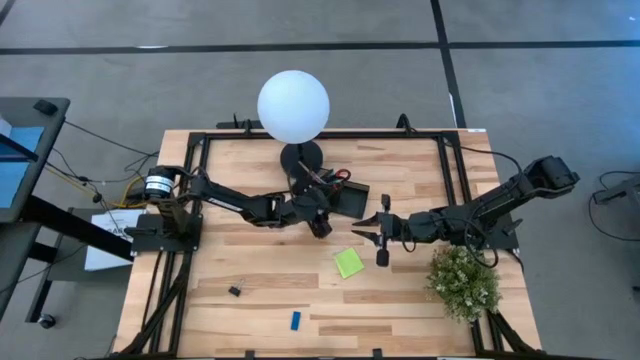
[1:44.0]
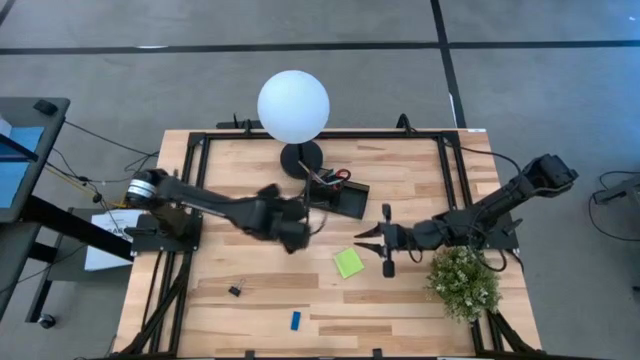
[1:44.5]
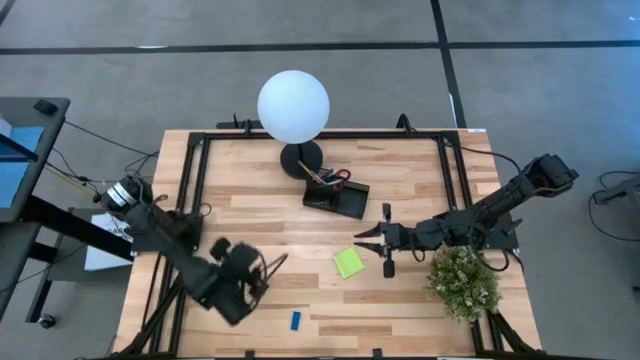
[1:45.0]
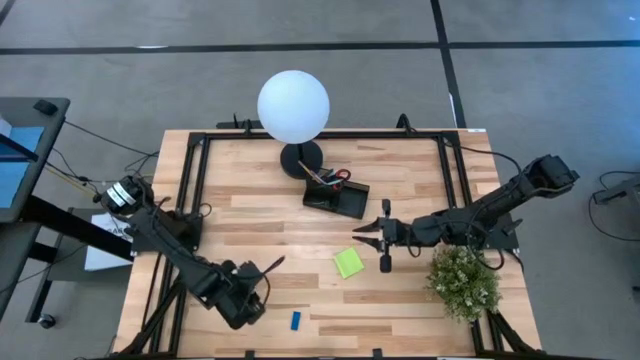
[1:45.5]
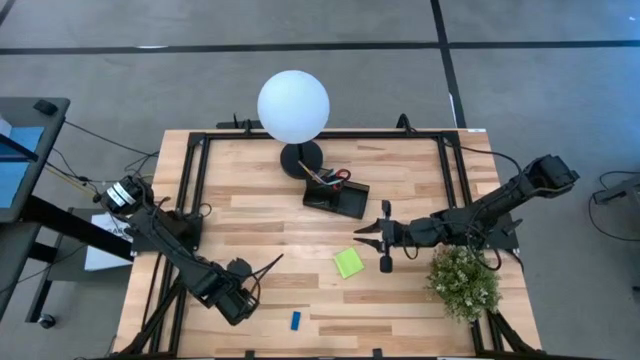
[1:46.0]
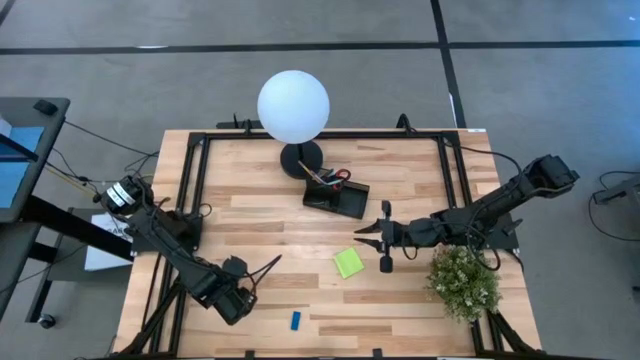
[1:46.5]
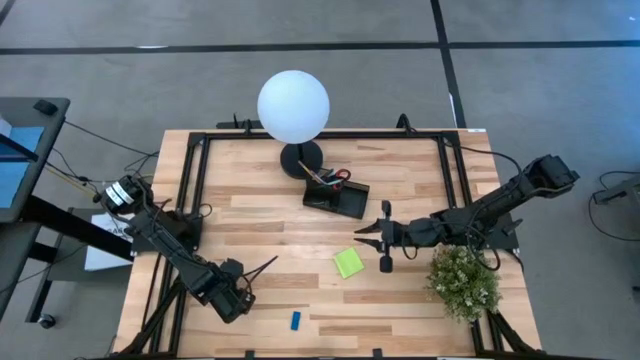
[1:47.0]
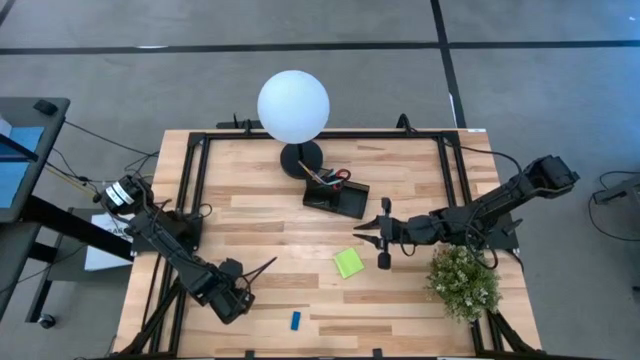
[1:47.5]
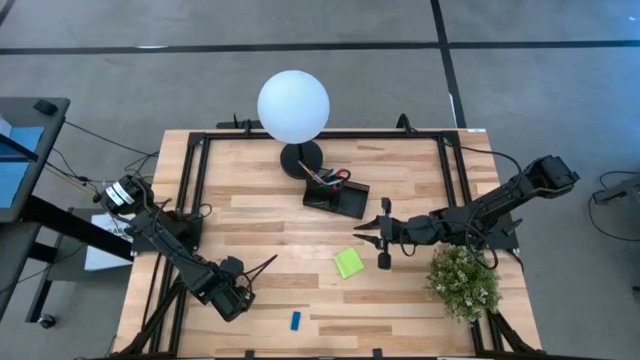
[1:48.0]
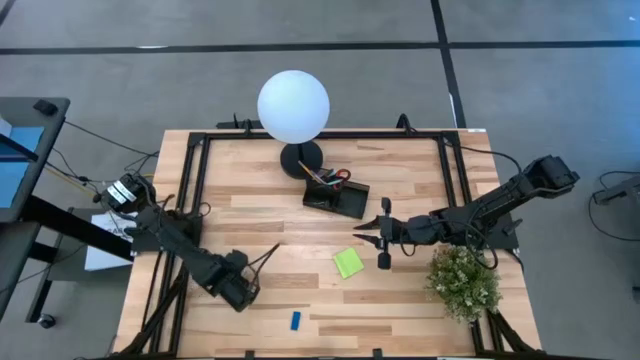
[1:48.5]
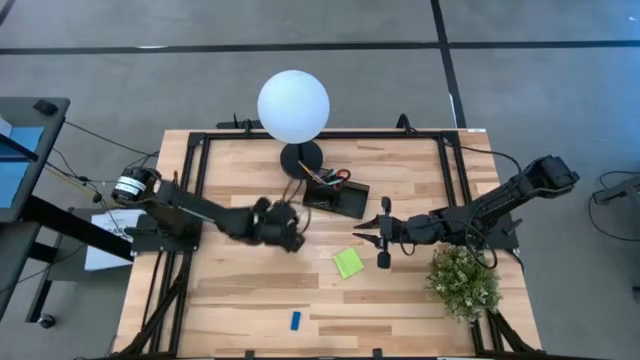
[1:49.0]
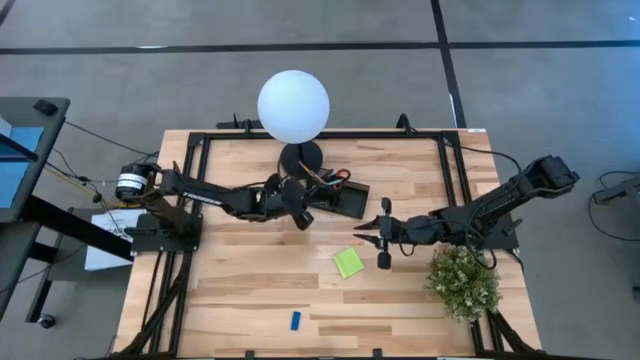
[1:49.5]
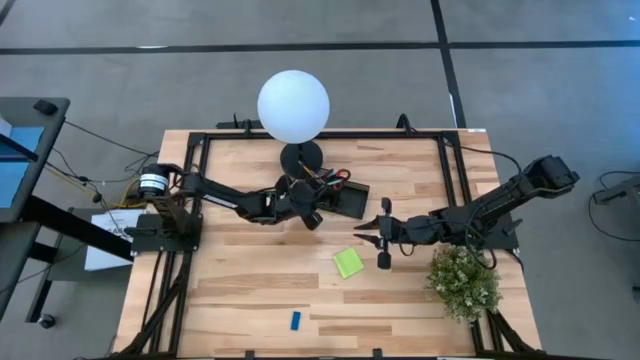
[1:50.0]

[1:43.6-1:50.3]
Task: Pick and place office supplies into organizer
Put the binder clip into the desk organizer

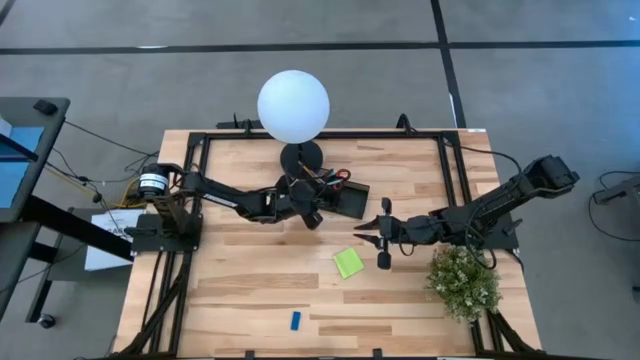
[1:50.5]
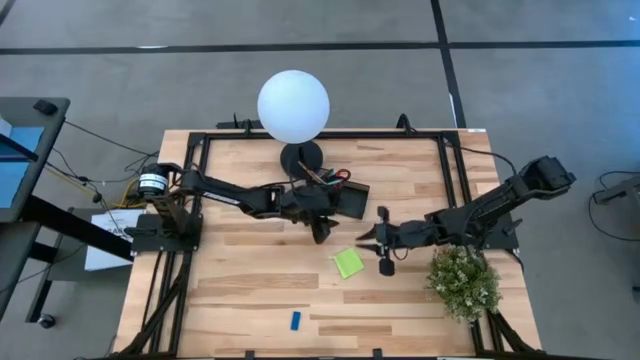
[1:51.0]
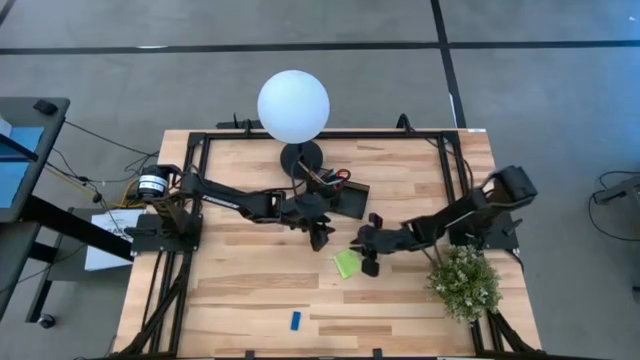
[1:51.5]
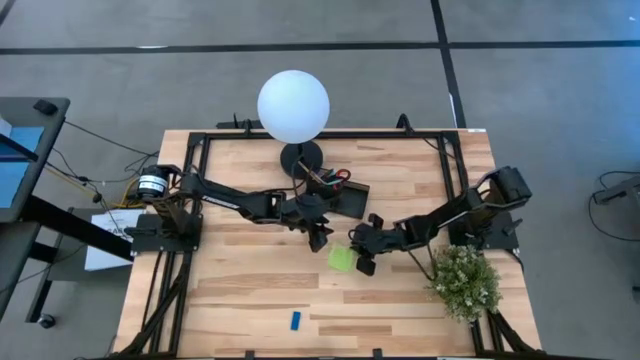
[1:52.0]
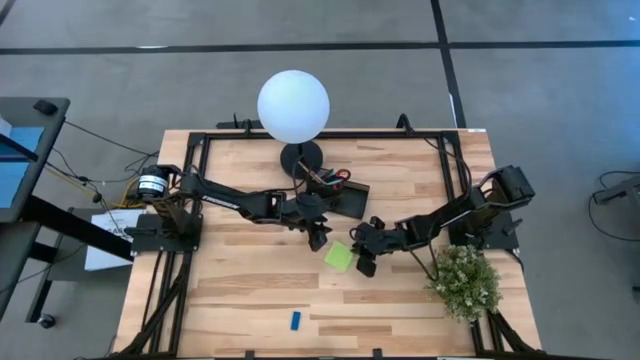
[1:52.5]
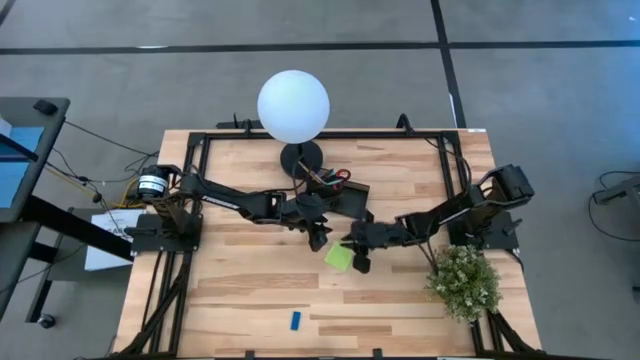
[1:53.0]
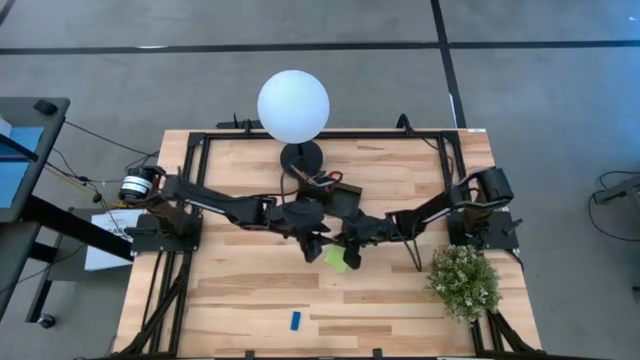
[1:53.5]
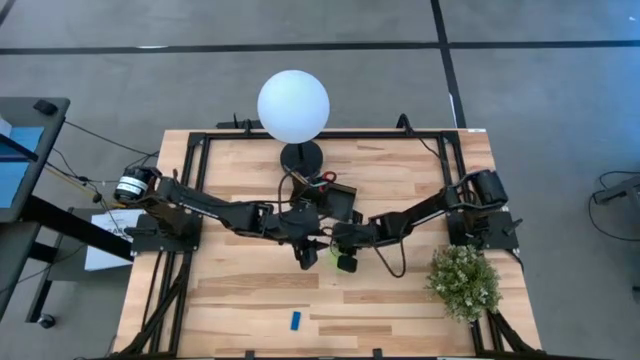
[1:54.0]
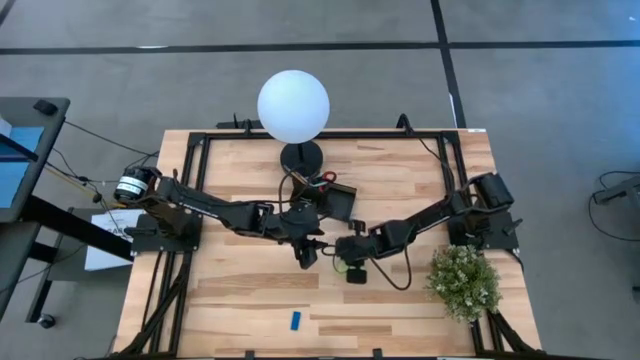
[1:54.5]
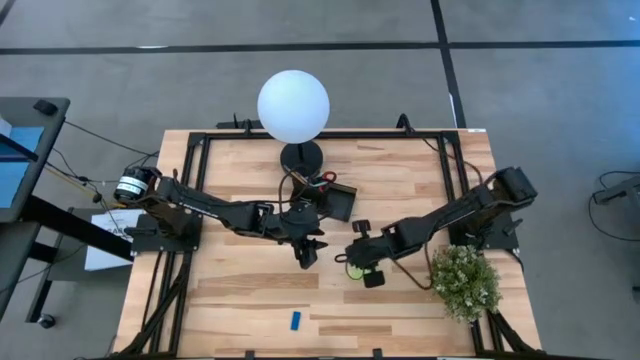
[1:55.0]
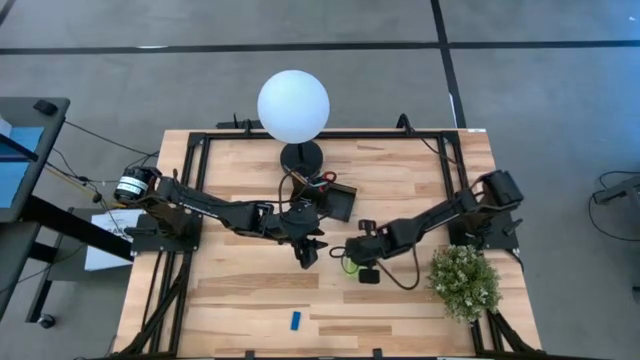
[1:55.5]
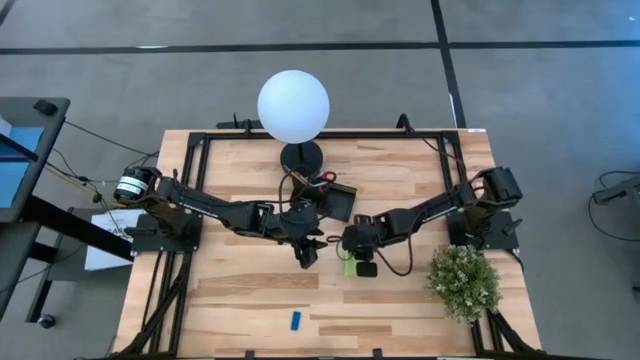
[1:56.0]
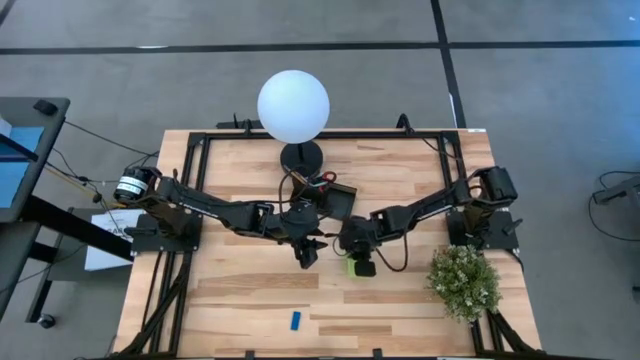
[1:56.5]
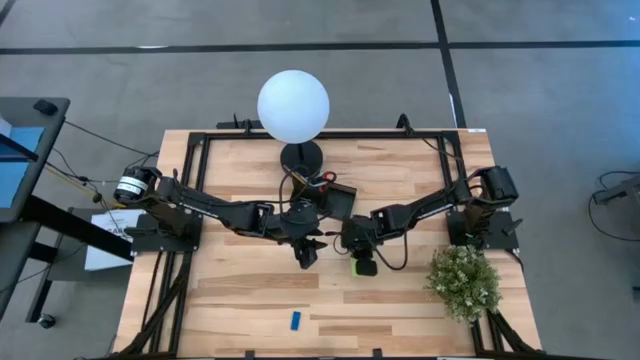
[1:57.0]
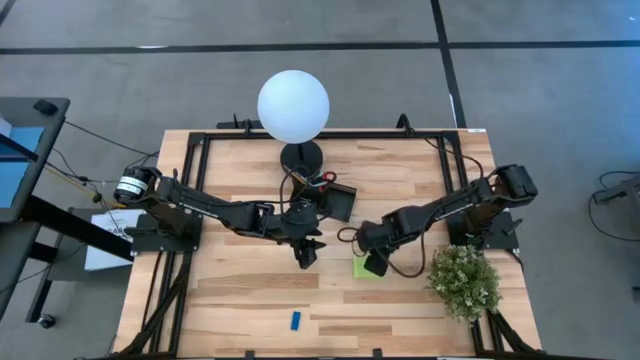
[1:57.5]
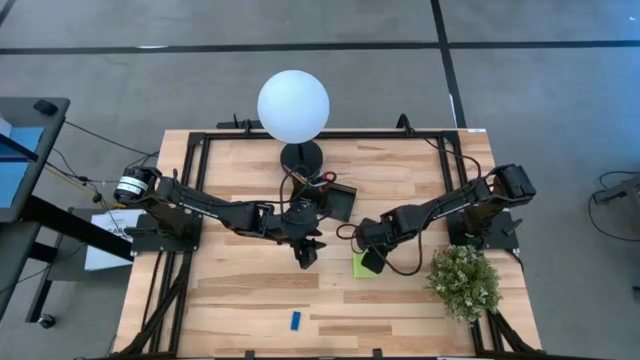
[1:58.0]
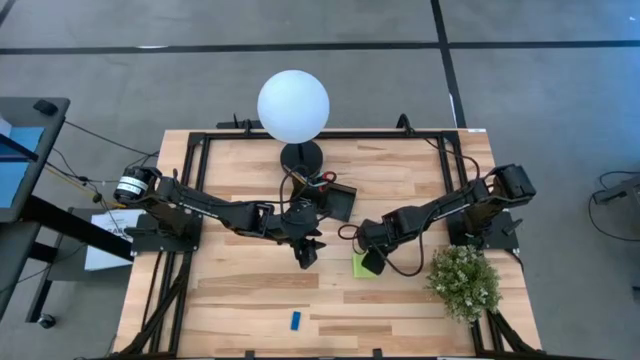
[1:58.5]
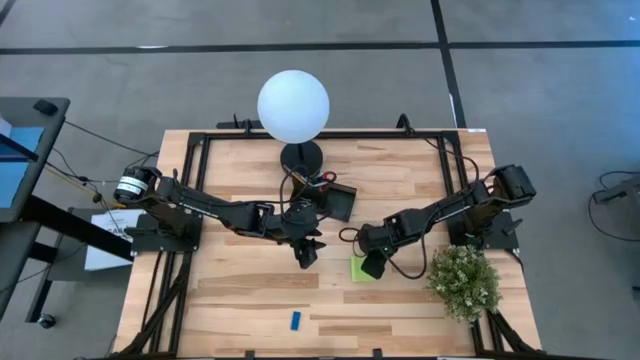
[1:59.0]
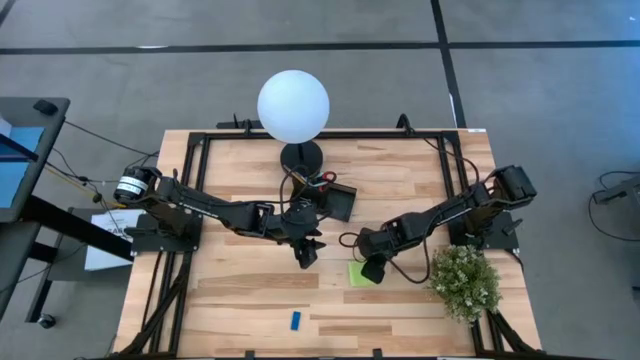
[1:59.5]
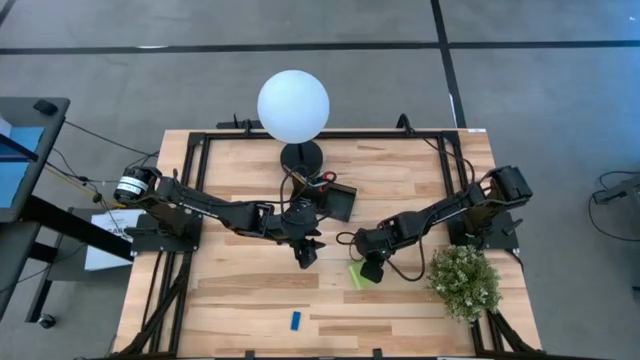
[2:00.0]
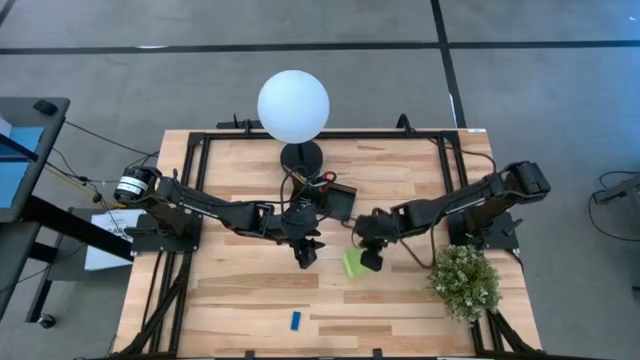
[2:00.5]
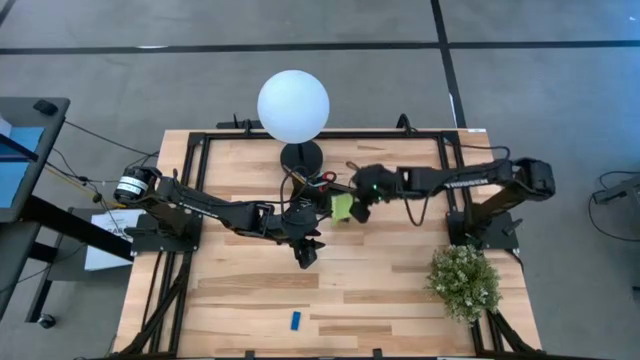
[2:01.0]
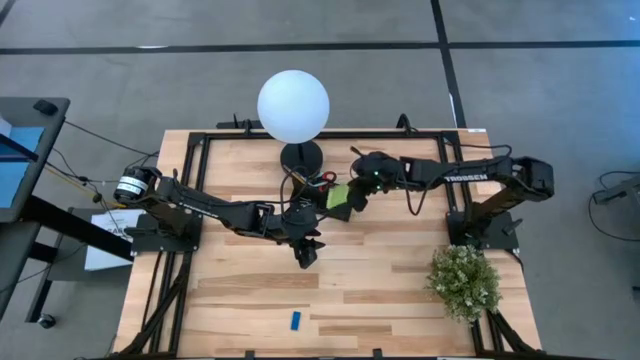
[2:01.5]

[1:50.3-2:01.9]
Put the sticky note into the desk organizer

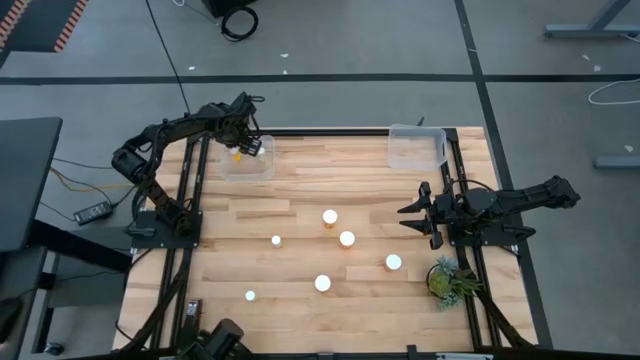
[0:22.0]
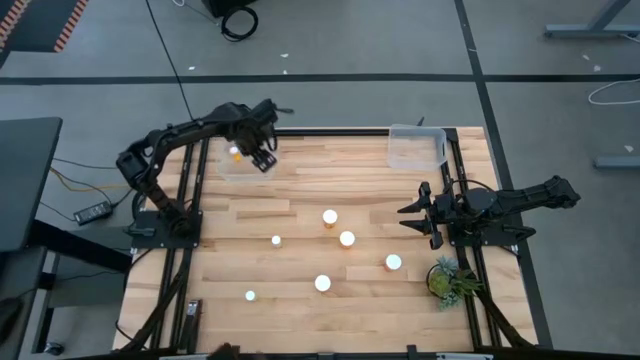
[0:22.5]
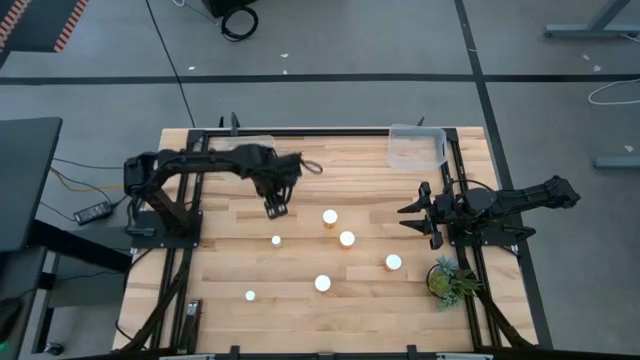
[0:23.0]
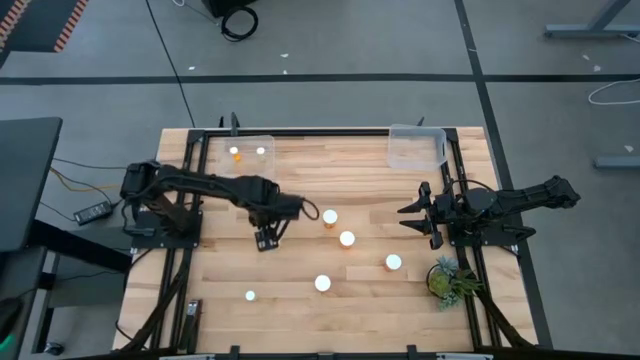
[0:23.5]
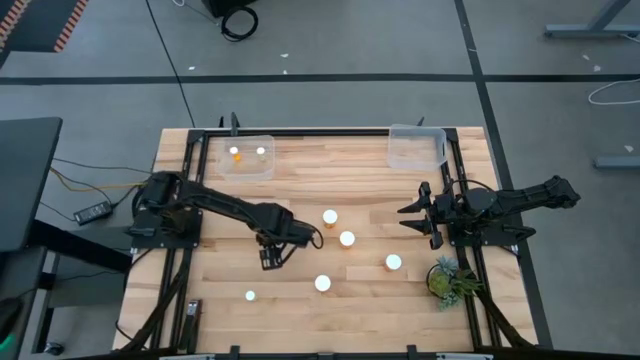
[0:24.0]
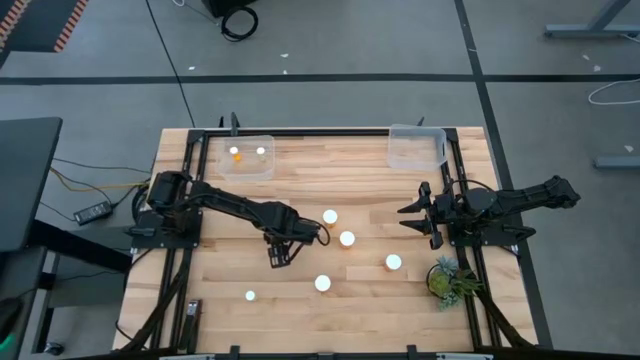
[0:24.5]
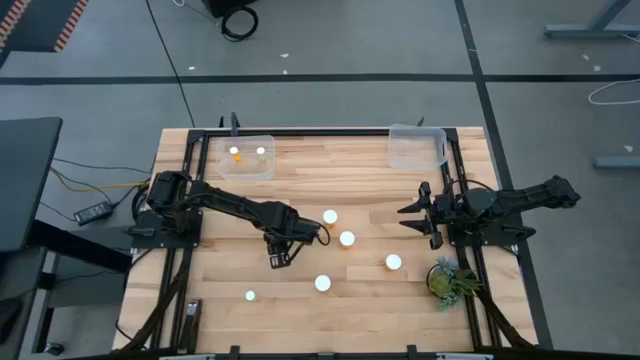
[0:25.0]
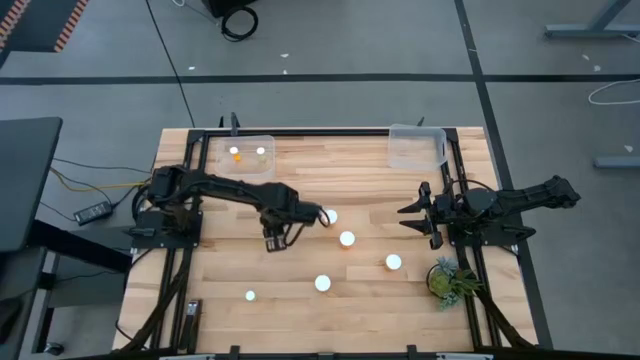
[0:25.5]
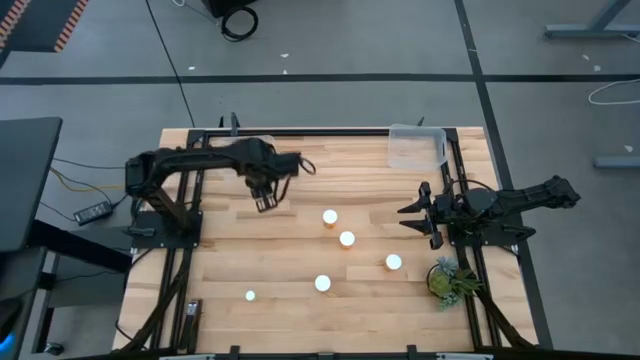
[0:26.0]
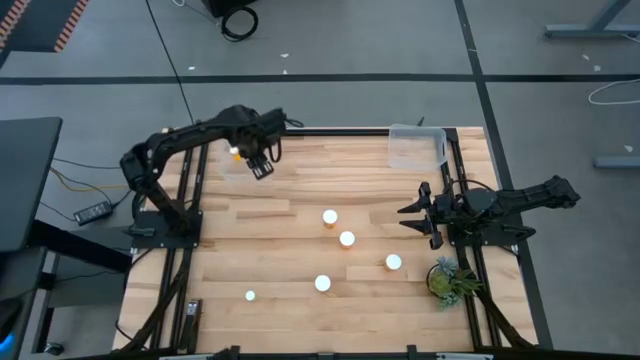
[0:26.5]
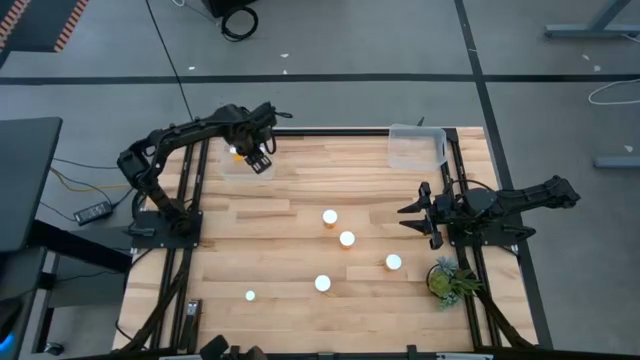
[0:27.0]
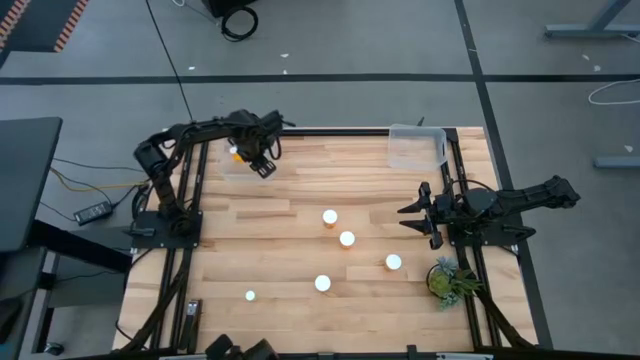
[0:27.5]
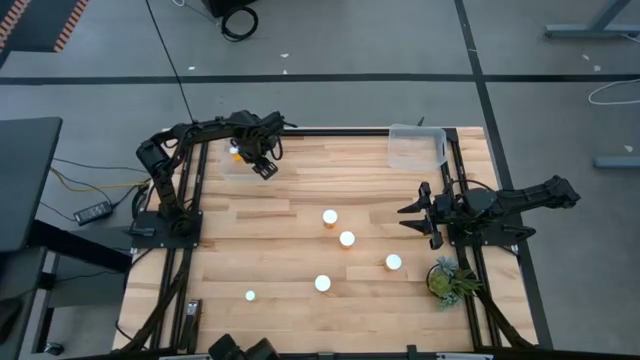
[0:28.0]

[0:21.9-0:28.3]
Task: Pick and place medicine bottles into bin by pill shape (circle, oval)
Put the top yellow tablet bottle into the left transparent bin
